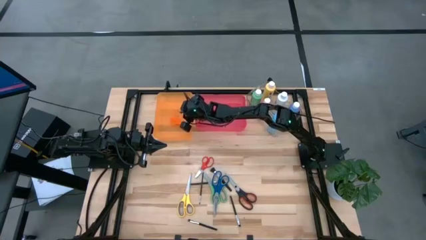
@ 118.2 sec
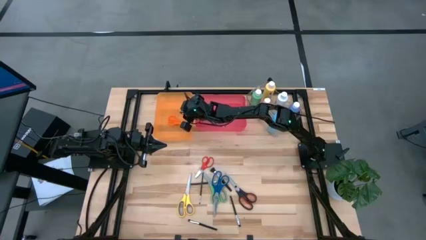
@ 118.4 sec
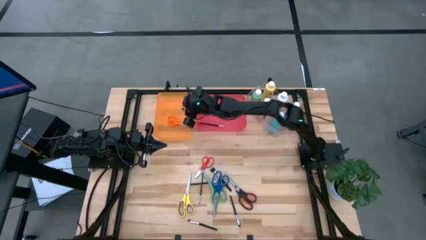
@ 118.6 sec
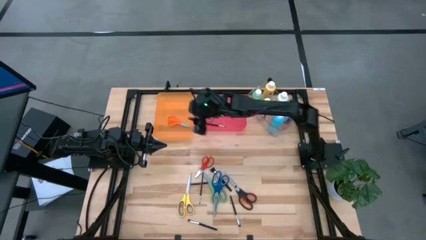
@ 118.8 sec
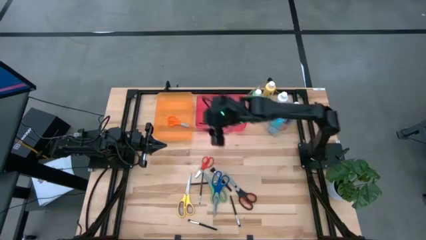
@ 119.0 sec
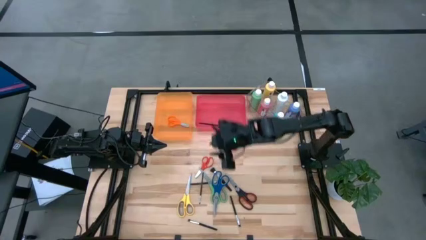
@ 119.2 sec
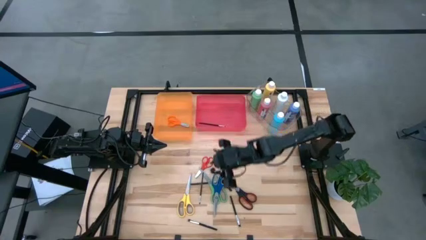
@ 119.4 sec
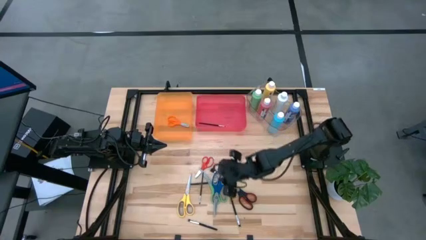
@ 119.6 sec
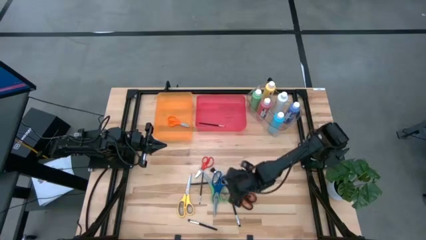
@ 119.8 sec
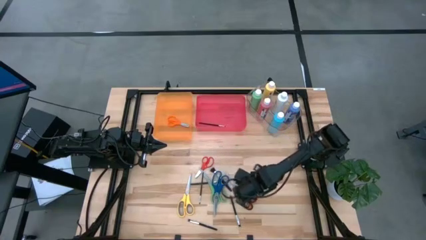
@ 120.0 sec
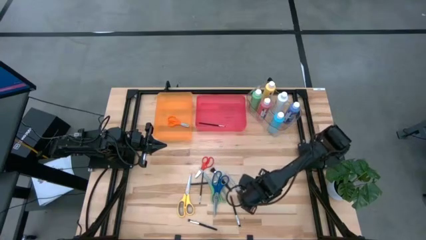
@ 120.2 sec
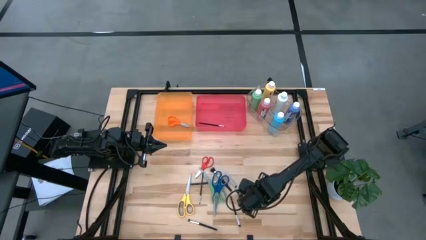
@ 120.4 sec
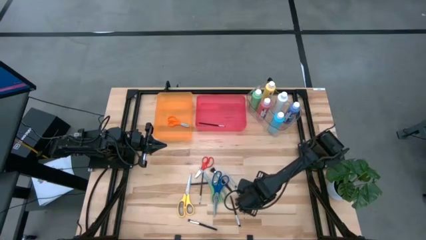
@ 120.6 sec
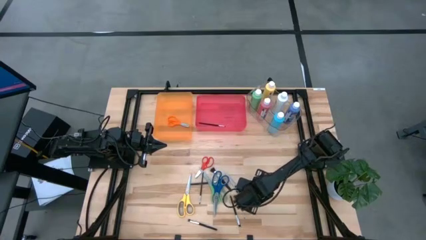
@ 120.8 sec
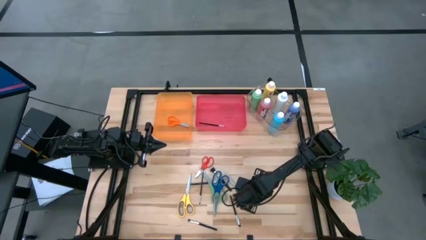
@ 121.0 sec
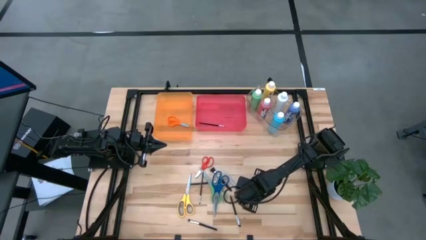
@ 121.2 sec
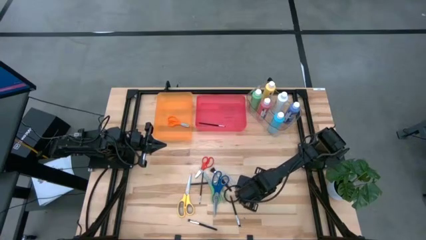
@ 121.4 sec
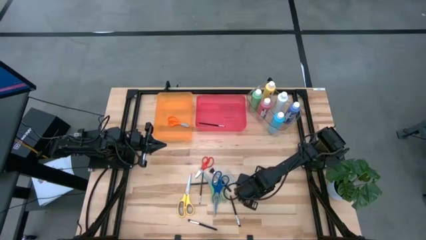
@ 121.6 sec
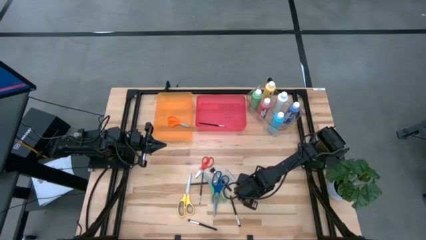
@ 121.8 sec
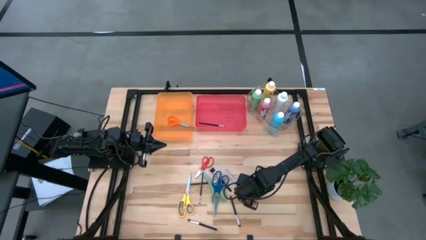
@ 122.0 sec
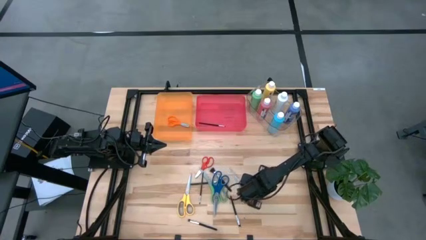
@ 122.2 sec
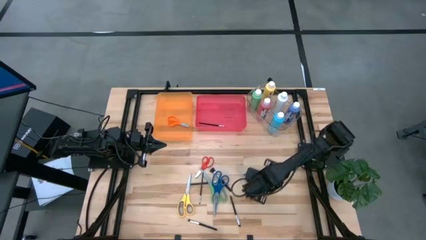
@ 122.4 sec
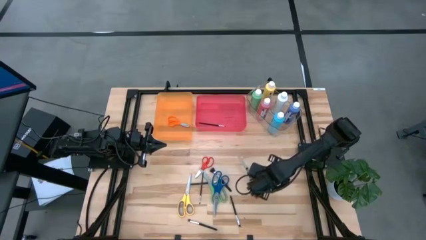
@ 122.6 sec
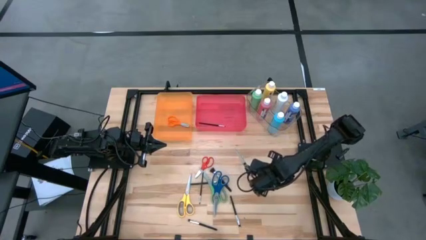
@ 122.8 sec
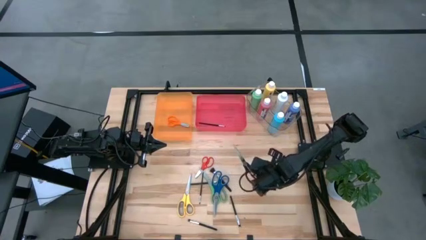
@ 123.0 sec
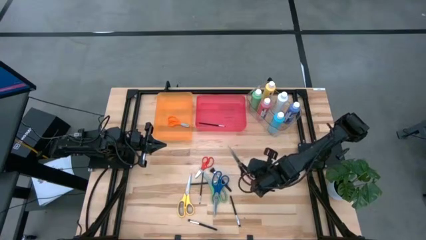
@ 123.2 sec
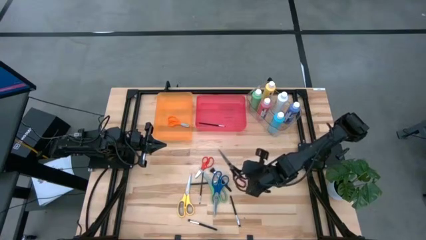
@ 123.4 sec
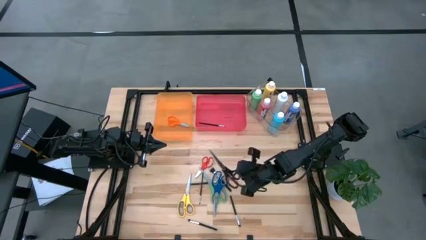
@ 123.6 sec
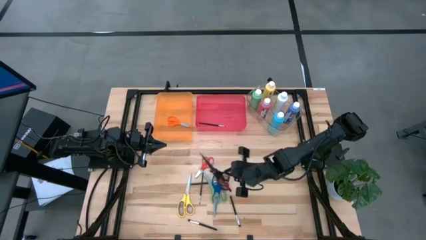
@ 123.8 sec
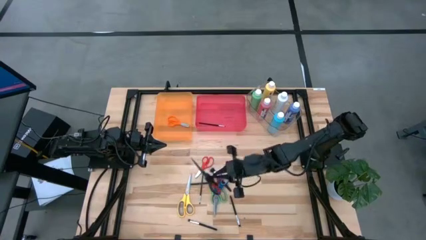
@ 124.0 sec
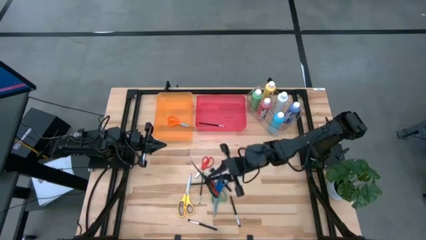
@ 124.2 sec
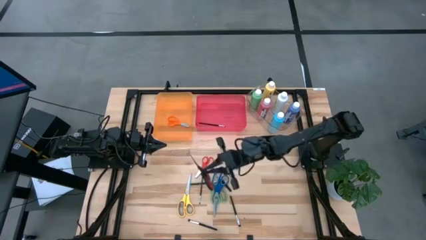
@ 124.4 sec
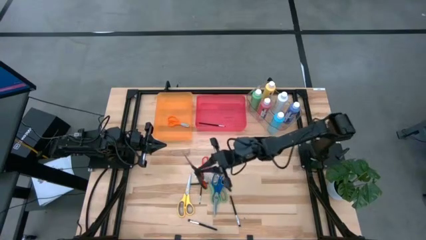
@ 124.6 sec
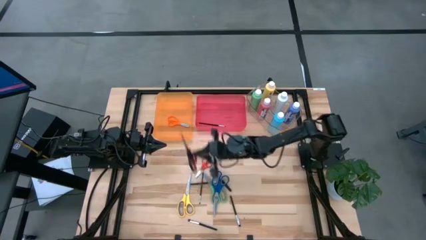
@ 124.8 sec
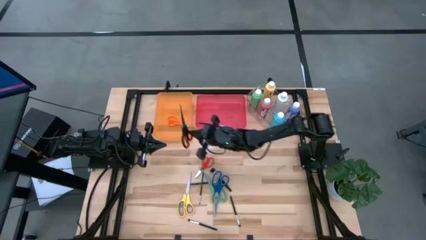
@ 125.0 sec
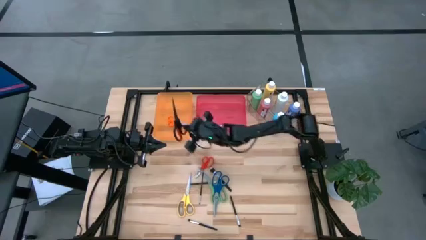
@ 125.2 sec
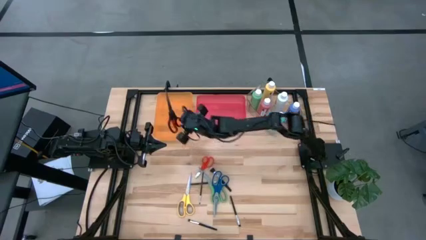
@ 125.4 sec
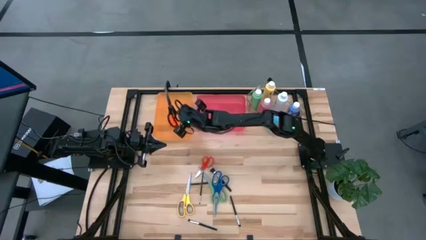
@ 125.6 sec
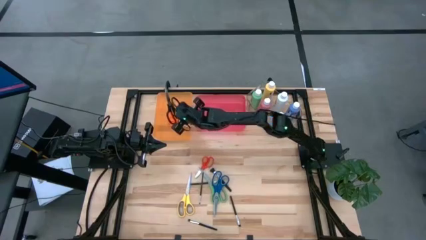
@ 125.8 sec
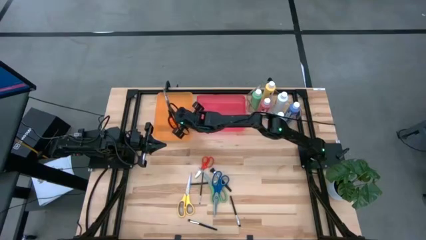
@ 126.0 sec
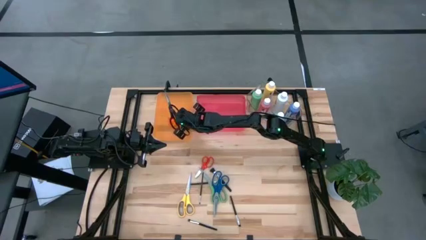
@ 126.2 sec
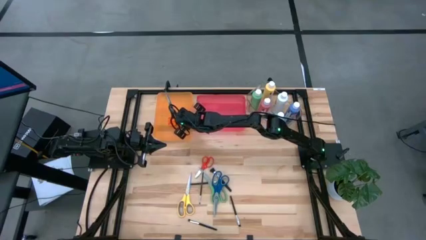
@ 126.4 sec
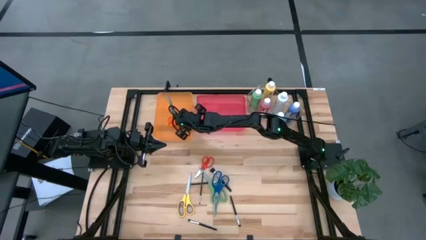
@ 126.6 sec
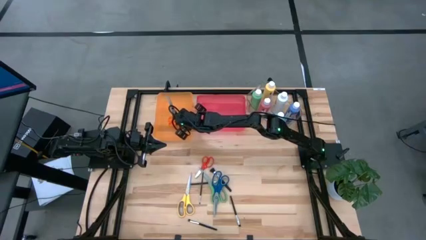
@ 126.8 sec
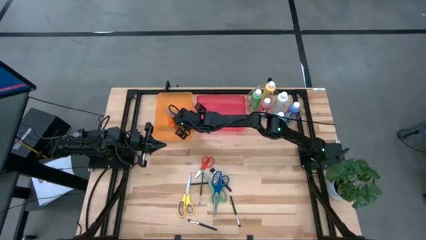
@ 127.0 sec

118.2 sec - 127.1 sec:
Task: Pick & Place Paint Supplies
Put the black scissors into the orange bin

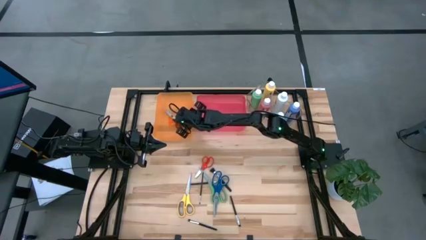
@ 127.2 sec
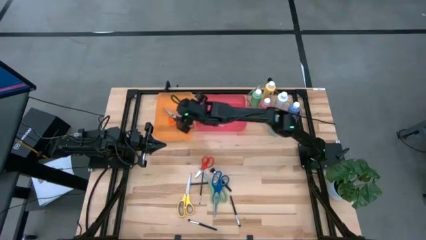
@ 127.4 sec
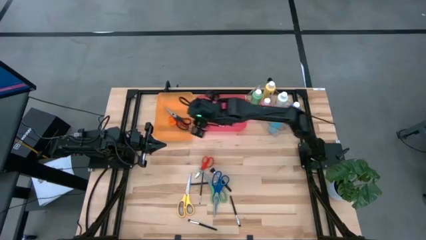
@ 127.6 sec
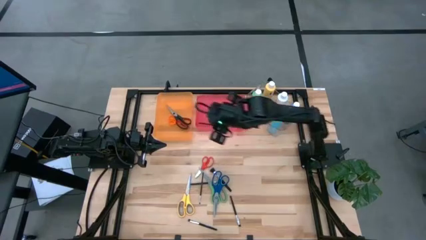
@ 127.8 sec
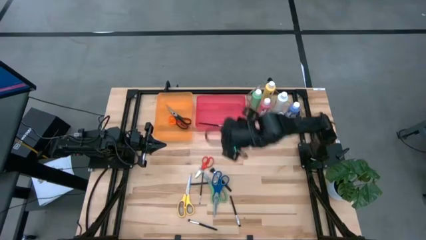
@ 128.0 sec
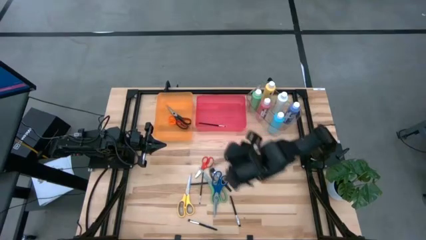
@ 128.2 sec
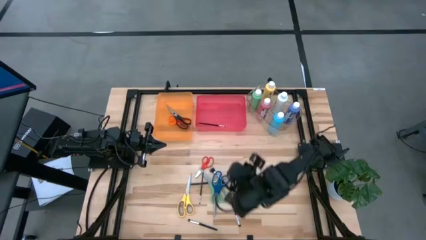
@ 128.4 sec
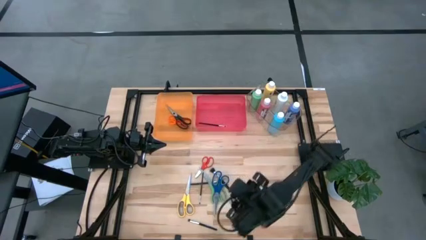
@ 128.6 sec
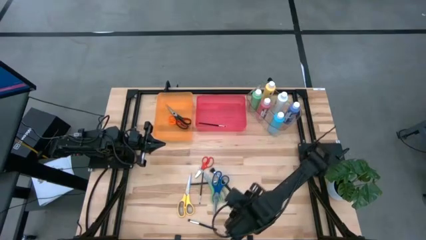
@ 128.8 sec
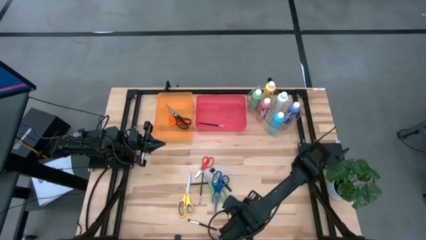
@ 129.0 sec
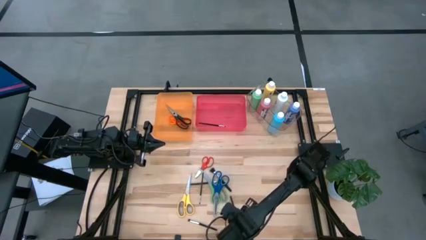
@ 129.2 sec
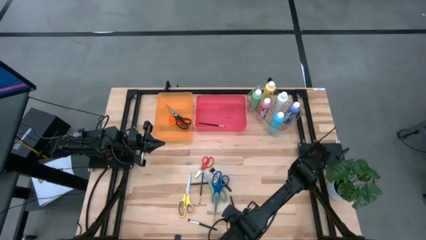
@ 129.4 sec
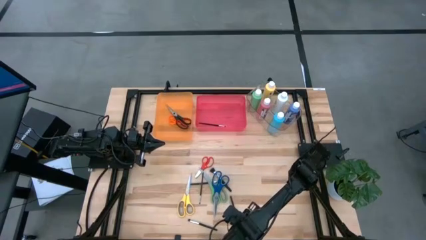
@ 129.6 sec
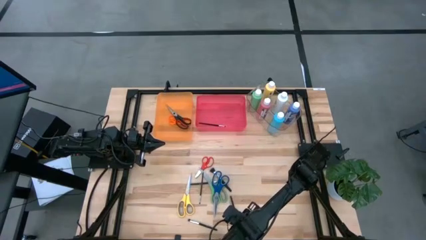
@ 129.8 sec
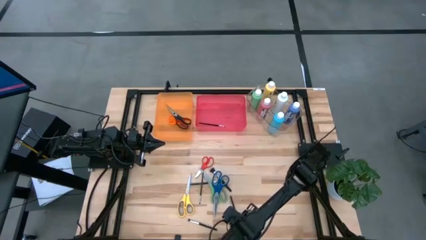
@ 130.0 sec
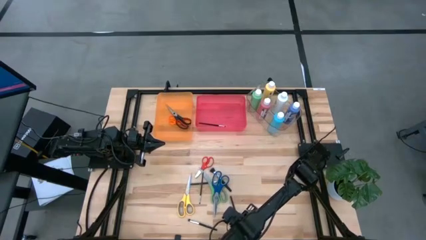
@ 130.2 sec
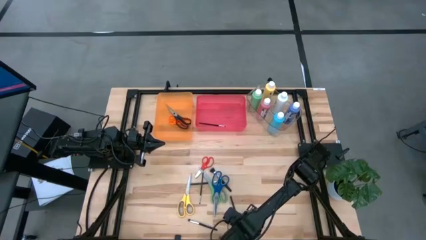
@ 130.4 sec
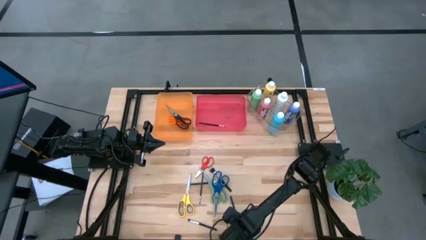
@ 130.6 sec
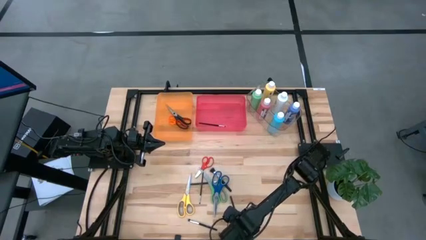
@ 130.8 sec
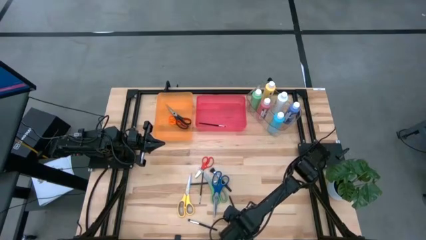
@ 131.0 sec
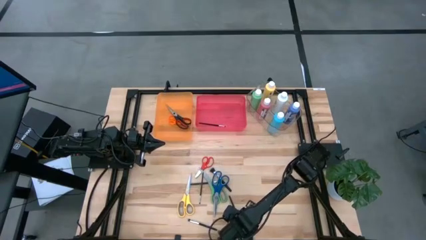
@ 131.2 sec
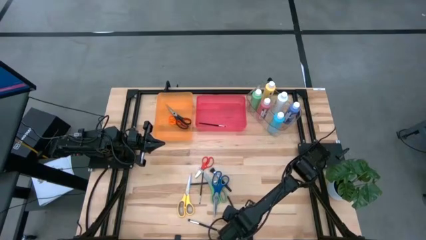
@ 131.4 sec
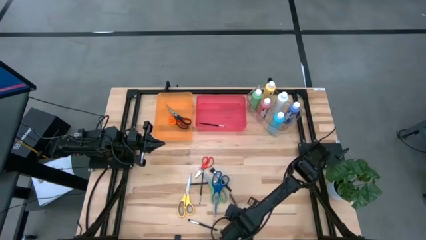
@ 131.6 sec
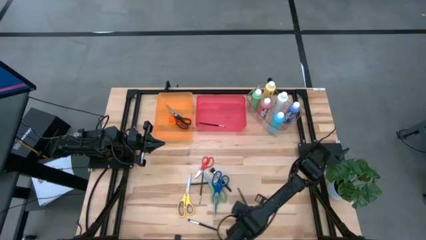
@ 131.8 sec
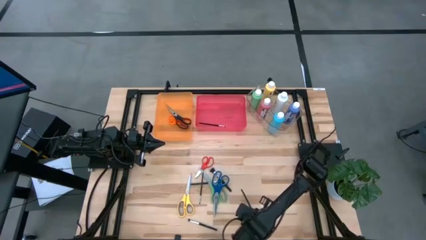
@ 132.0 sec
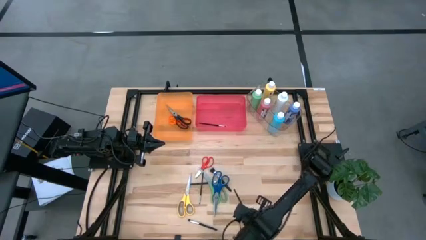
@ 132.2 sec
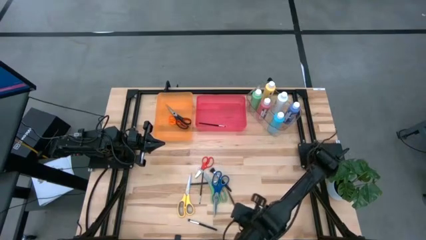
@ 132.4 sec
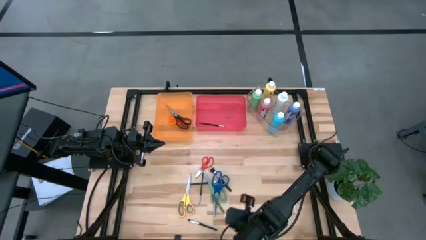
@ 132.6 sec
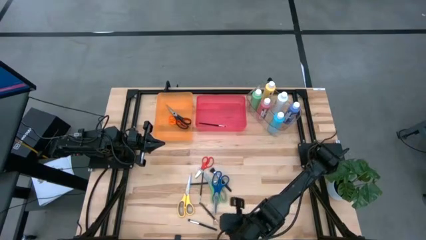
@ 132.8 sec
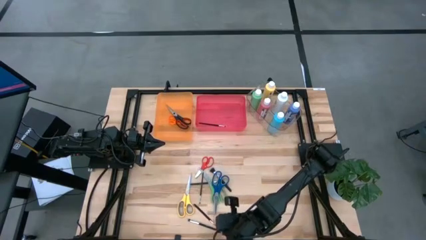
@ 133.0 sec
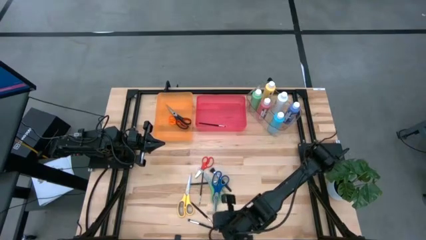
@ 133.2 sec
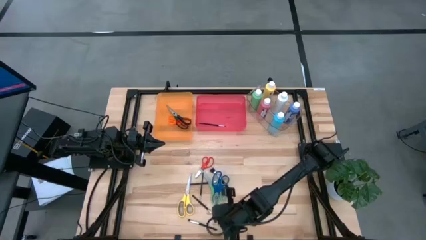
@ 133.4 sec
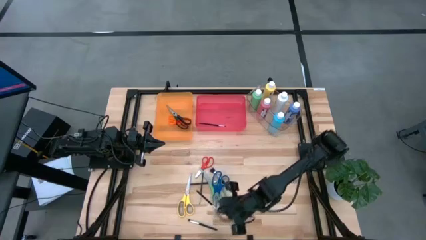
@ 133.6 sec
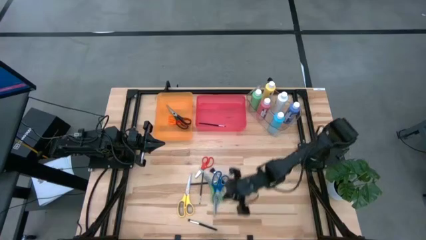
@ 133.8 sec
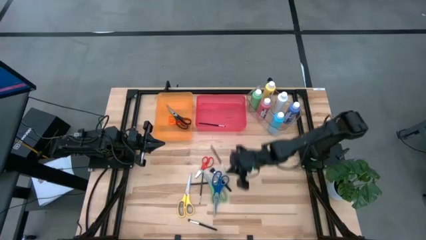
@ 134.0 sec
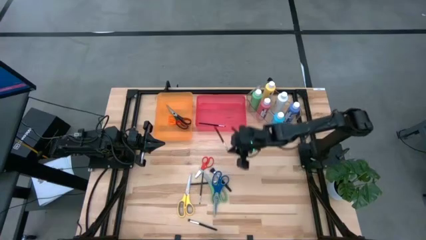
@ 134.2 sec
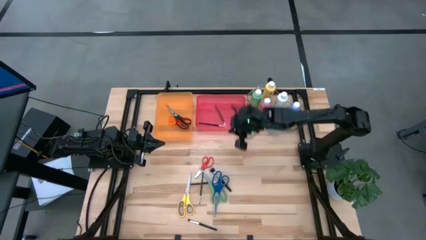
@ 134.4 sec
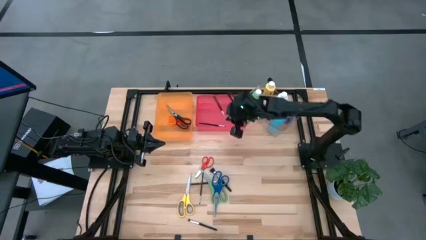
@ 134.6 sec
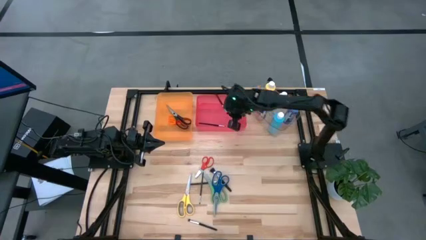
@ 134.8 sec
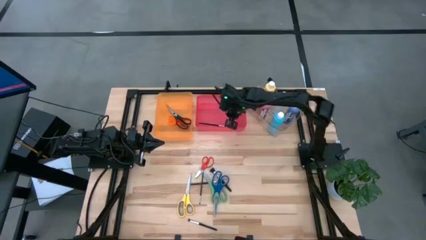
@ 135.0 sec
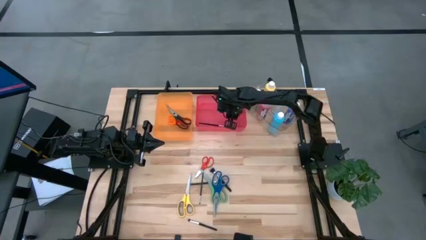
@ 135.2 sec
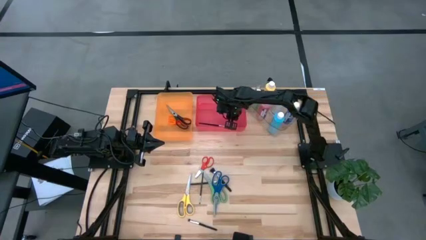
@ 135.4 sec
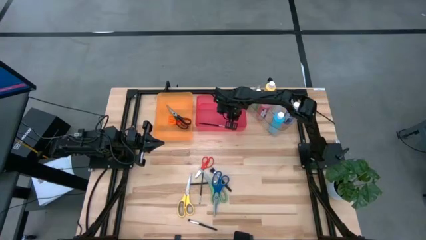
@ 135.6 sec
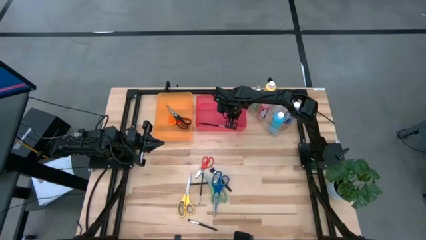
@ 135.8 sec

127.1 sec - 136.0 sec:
Put the black paintbrush into the pink bin
